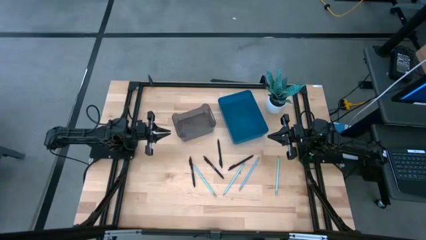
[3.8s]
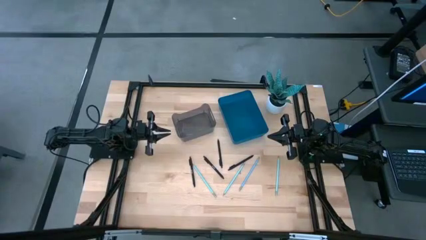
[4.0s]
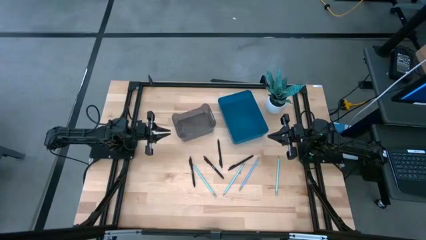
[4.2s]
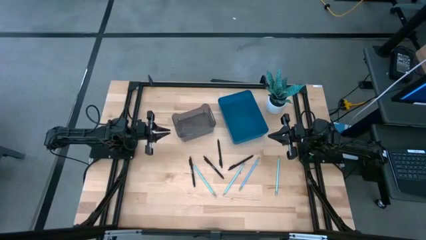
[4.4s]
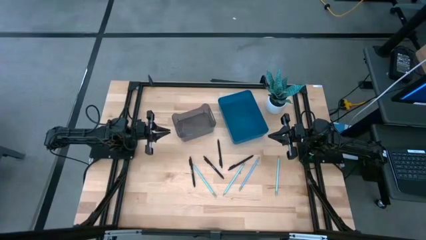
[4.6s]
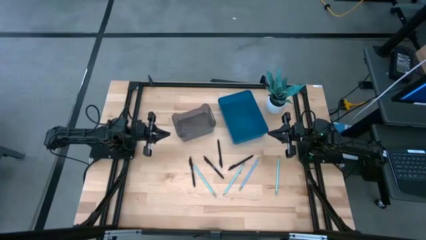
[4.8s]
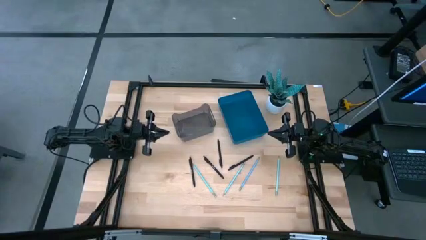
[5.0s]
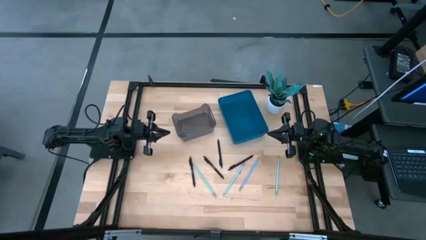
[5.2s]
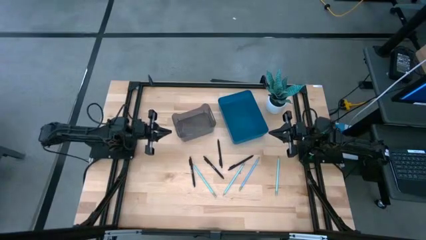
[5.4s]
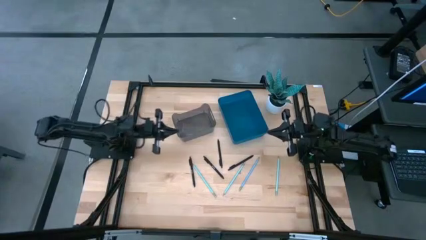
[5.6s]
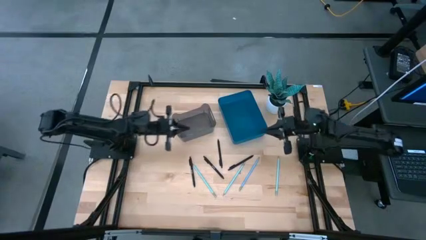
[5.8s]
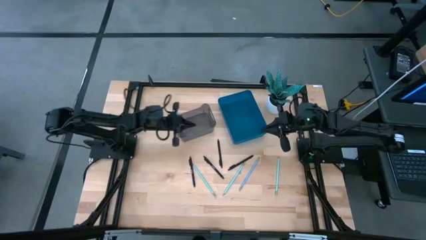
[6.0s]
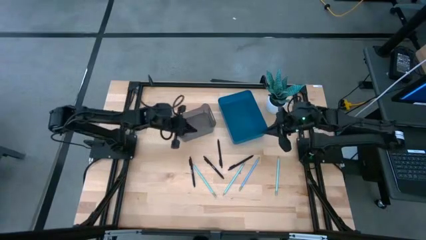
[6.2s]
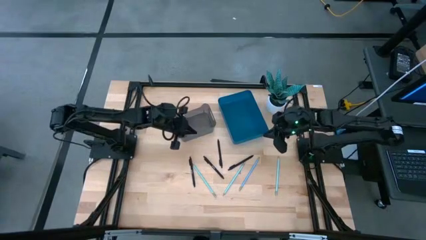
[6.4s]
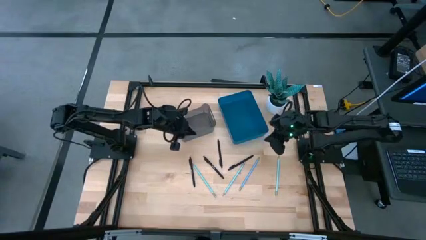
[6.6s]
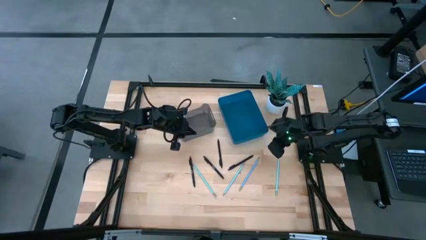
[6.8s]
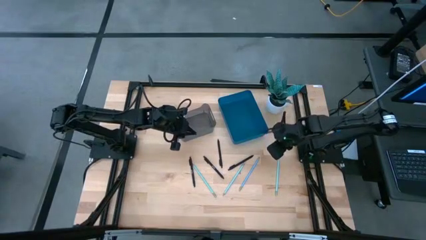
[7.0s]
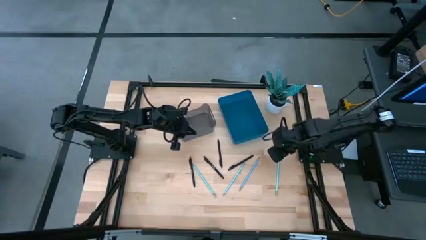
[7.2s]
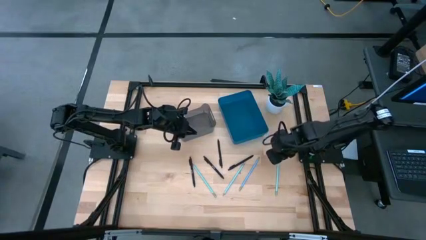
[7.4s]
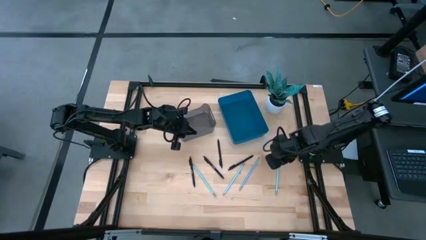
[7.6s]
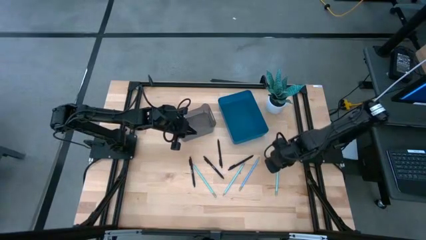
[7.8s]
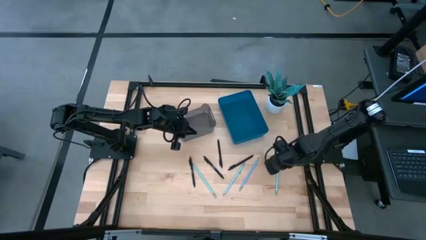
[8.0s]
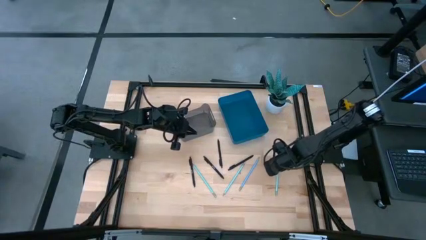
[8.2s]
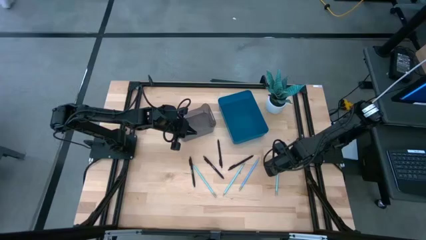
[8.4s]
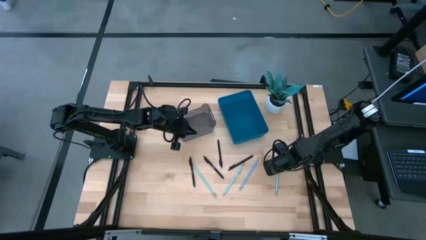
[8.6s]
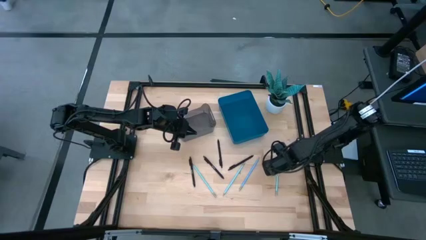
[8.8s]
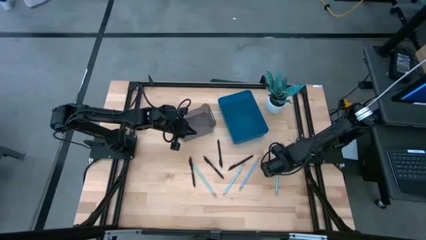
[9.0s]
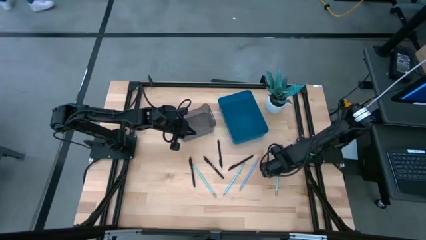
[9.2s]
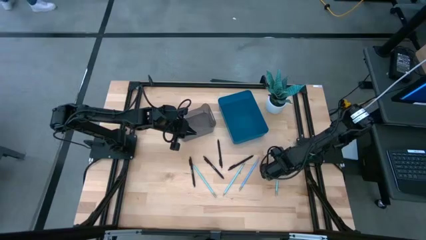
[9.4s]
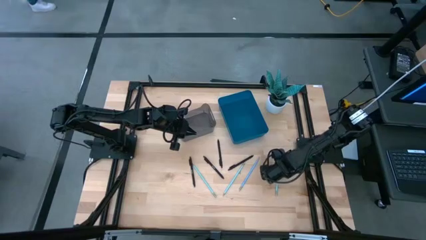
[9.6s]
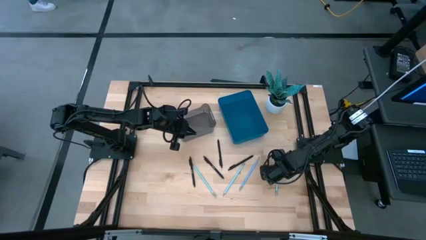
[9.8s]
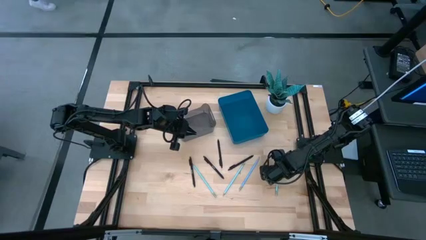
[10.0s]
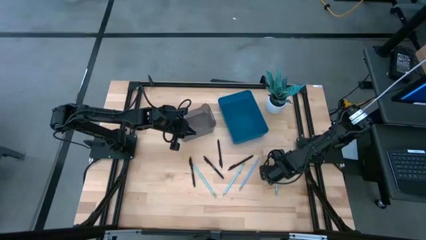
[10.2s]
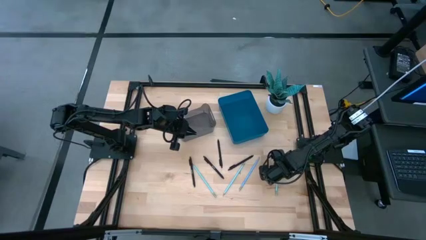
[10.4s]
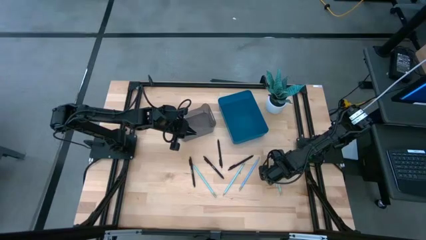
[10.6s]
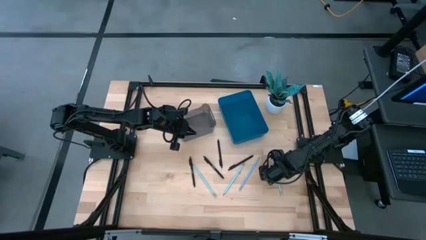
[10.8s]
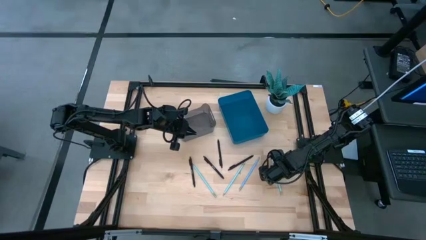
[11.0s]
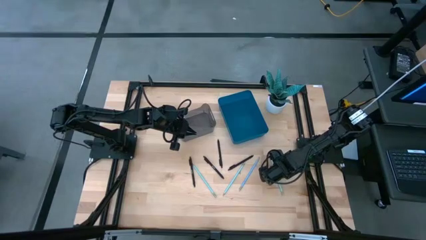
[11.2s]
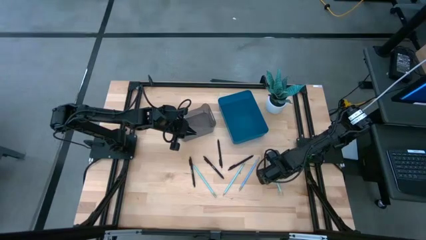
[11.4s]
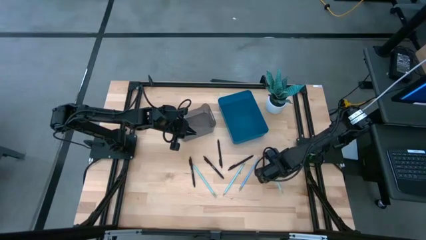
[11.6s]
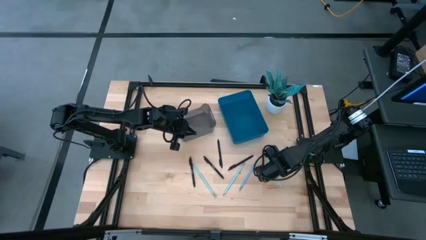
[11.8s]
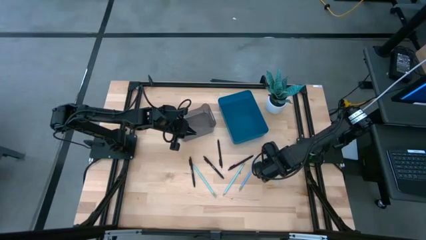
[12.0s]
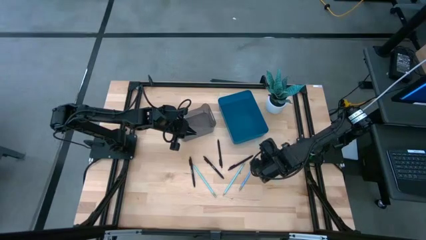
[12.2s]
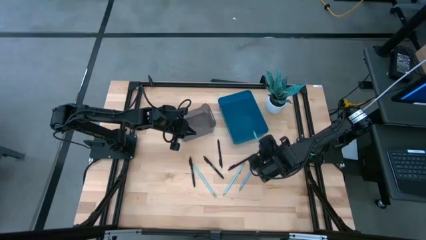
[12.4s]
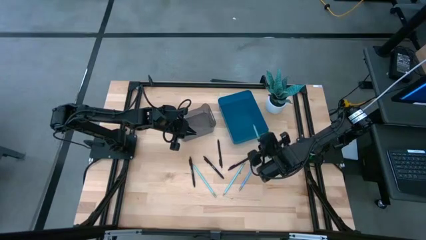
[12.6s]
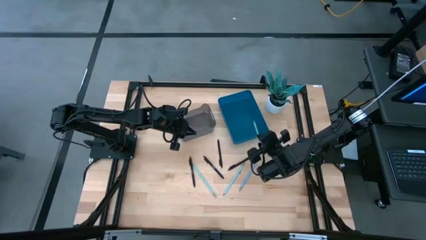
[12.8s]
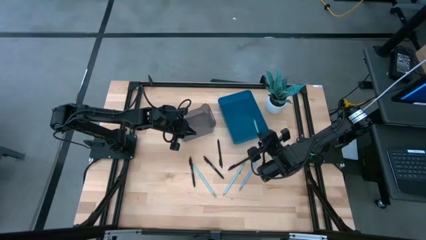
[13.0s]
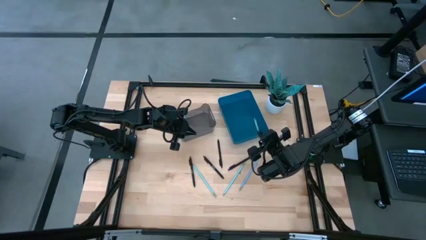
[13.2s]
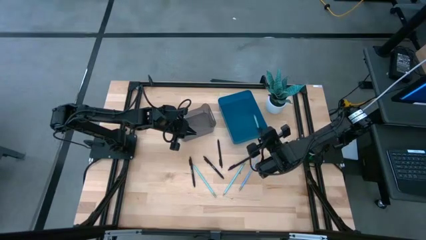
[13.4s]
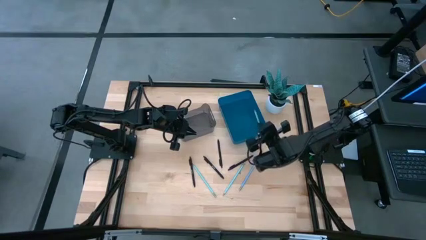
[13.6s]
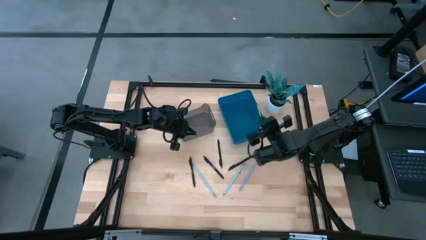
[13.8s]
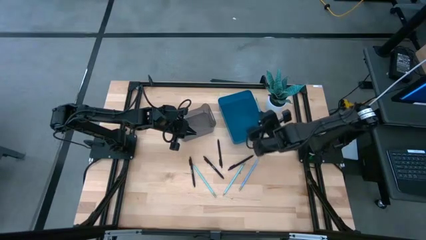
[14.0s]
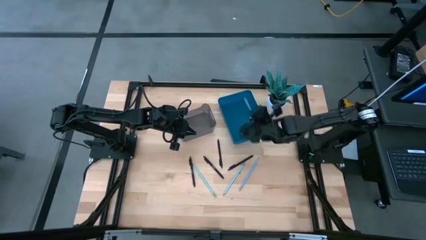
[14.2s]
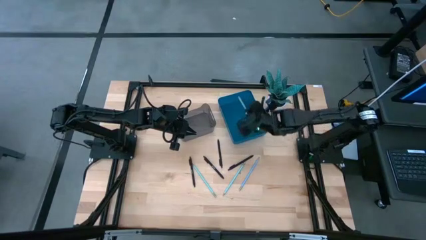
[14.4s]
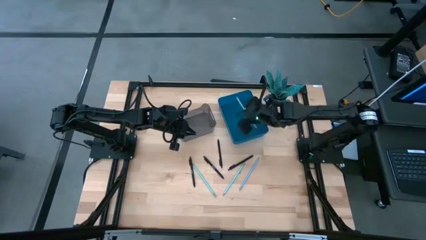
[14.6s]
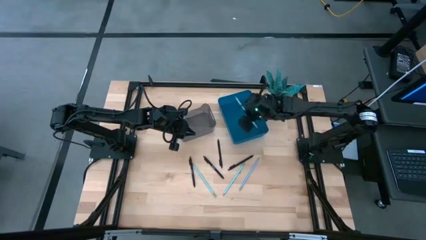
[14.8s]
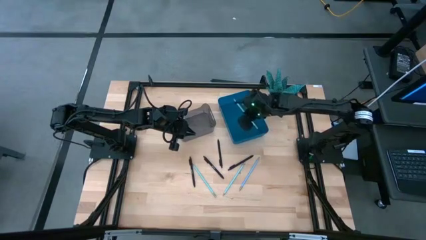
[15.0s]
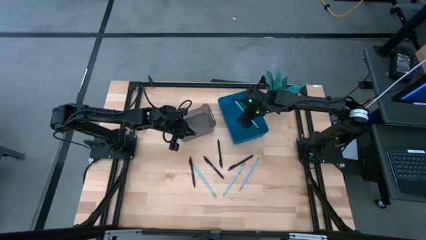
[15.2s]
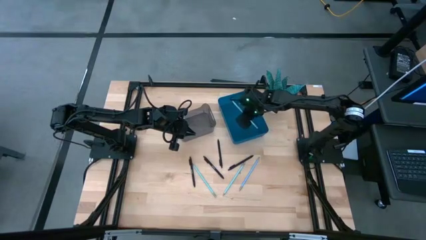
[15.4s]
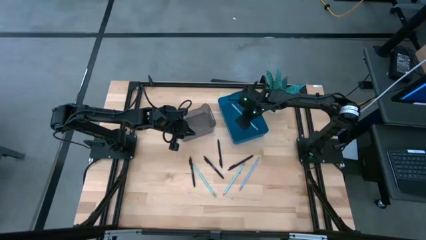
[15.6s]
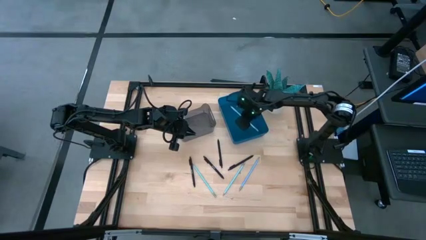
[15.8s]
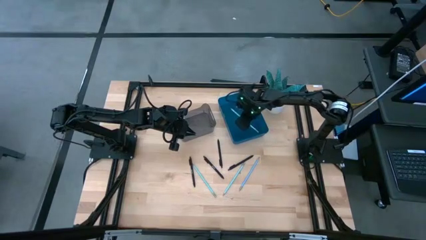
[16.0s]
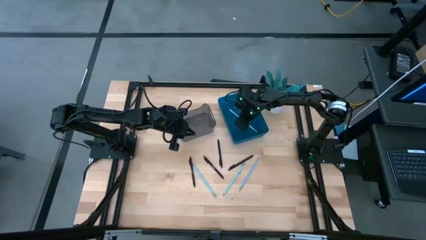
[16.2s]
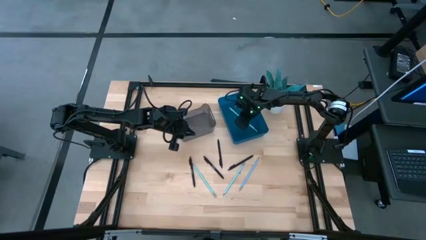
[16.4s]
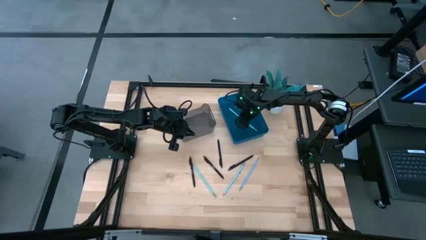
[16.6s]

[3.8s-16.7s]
Task: Sort pens & pencils
Put the light blue pencil into the blue bin

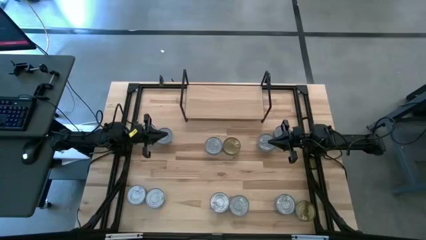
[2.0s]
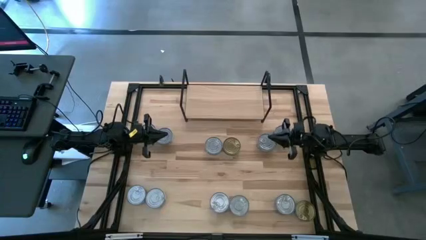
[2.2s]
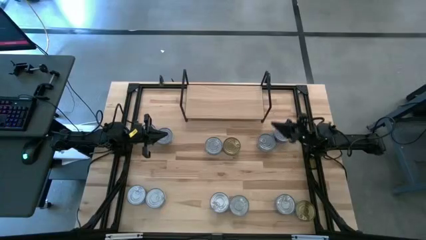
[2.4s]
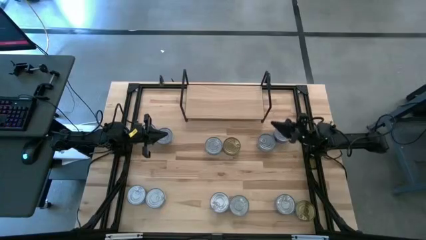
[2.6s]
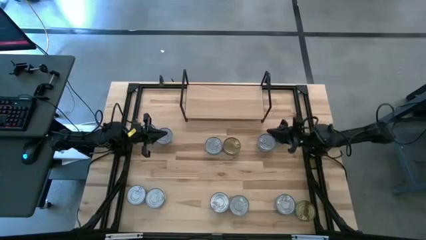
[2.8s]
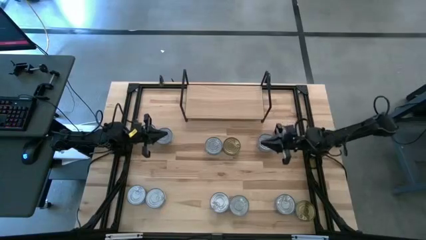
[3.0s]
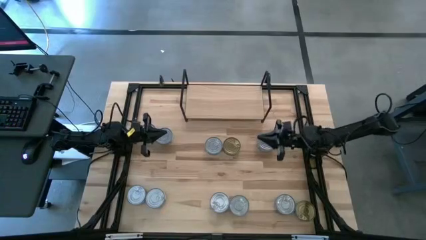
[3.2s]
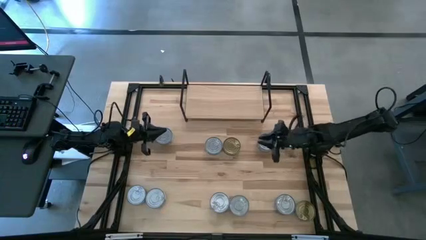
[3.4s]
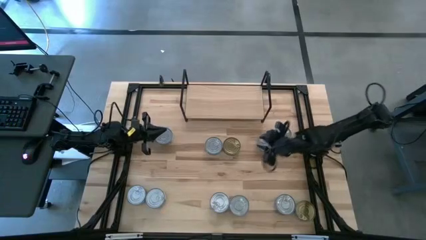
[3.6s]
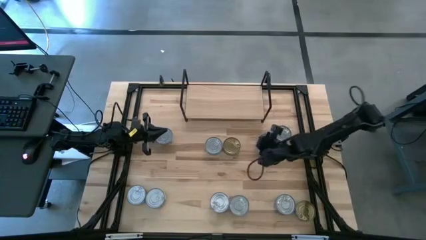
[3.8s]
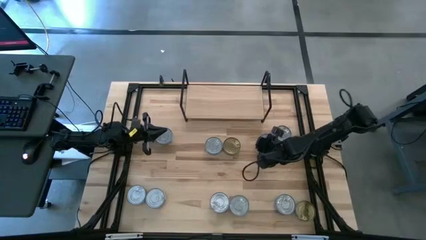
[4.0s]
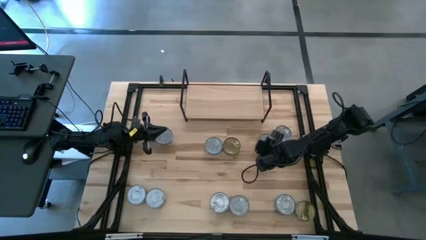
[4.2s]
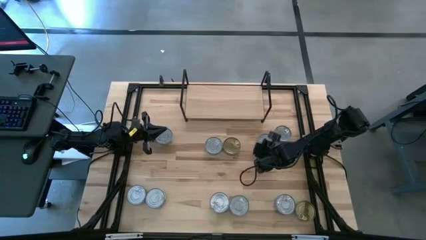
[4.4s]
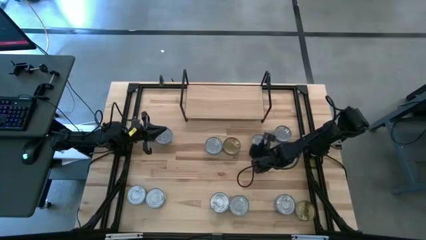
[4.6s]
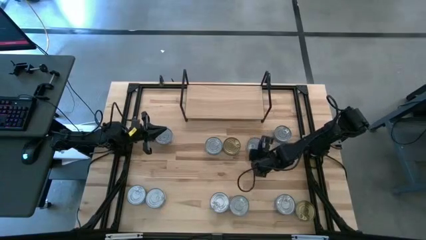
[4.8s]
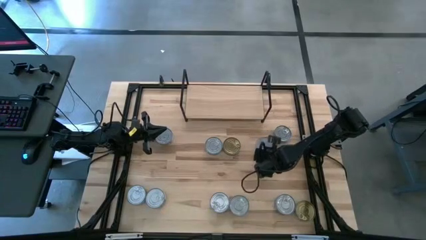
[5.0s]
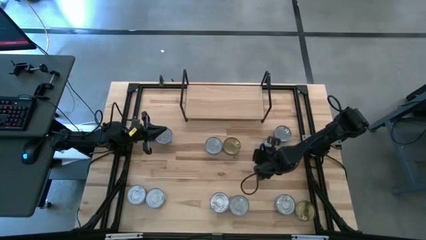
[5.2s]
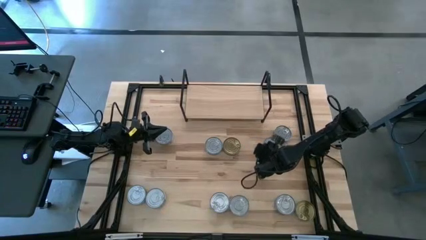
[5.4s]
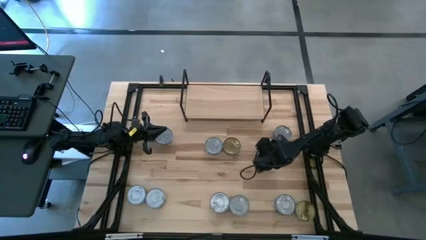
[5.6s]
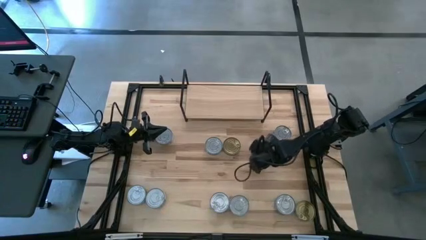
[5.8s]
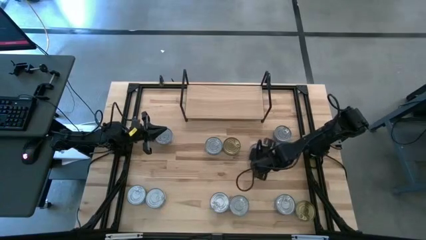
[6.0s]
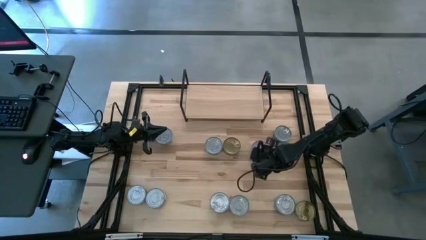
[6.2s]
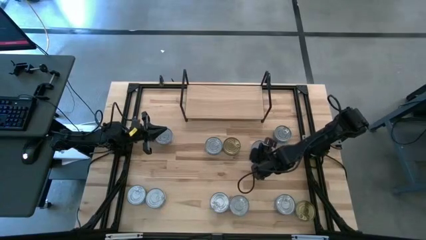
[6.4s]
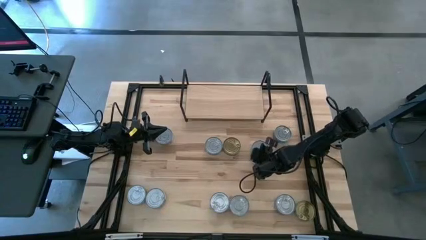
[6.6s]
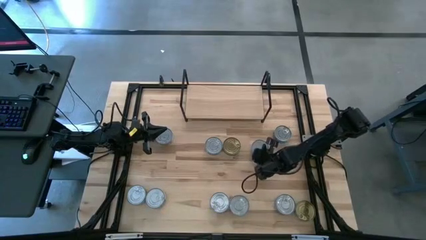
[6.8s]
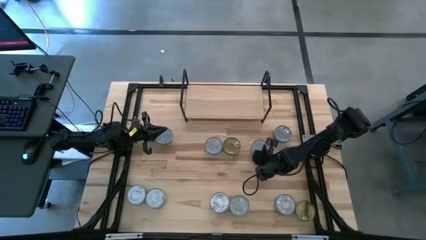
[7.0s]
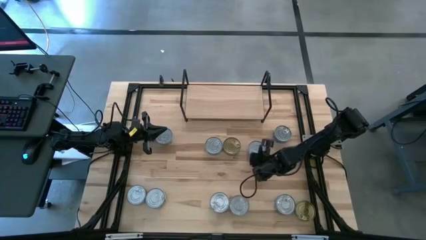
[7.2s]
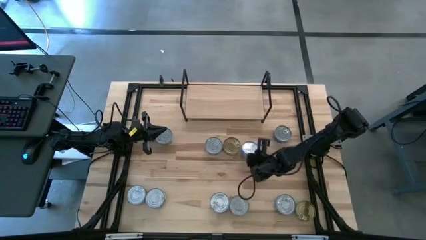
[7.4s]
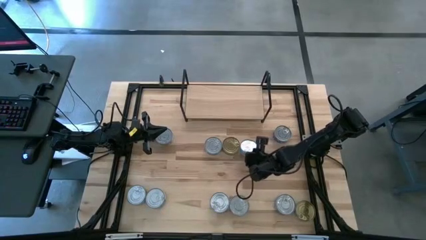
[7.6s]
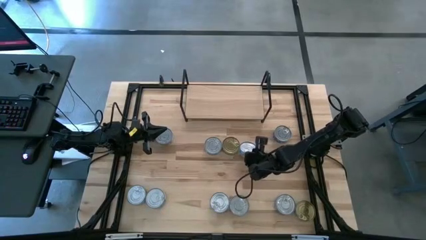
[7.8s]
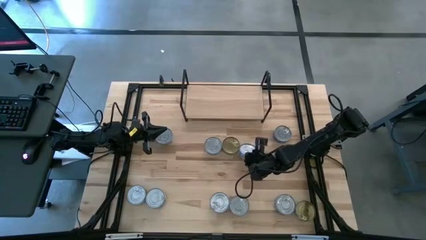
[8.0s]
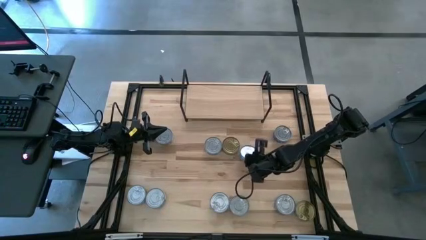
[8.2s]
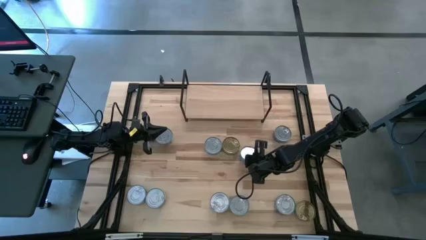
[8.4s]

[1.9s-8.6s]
Task: Stack canned seafood by type on shelf
Put the top right yellow-blue tuna can on the shelf
